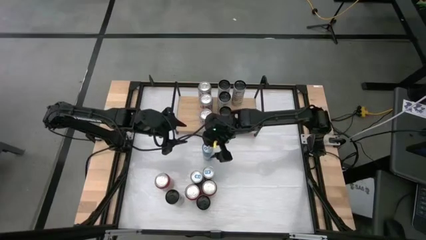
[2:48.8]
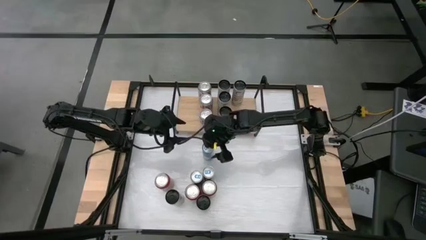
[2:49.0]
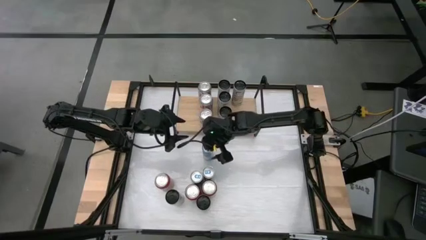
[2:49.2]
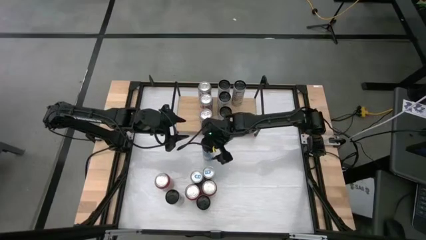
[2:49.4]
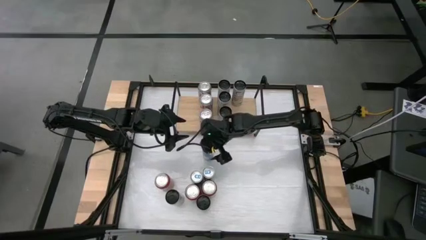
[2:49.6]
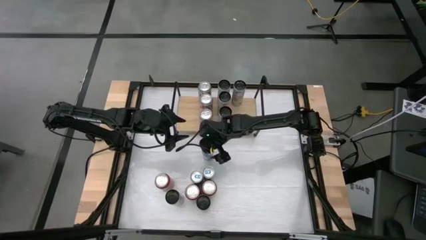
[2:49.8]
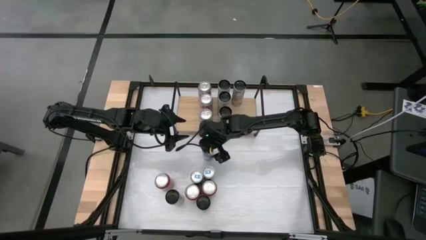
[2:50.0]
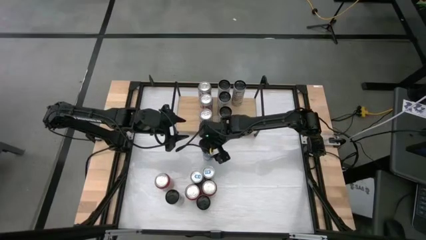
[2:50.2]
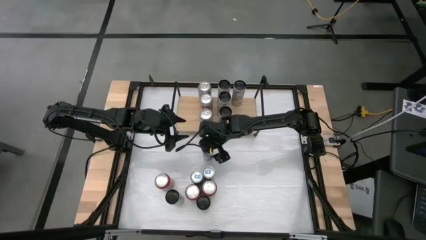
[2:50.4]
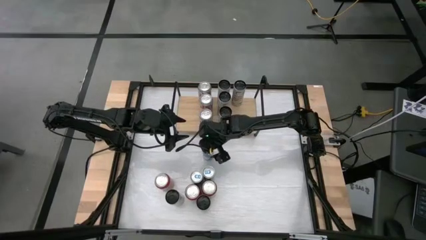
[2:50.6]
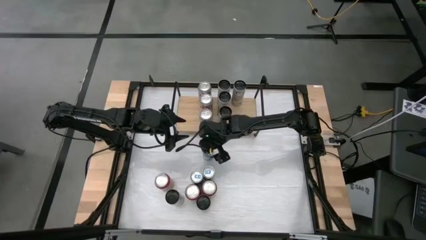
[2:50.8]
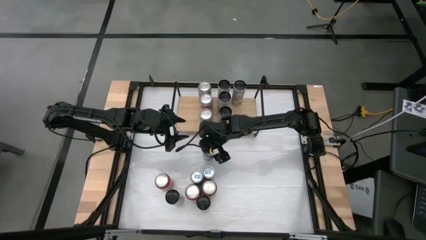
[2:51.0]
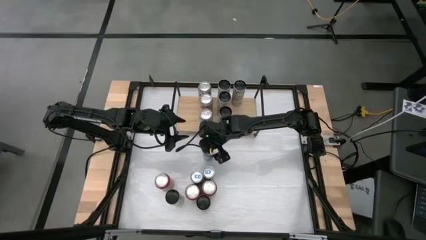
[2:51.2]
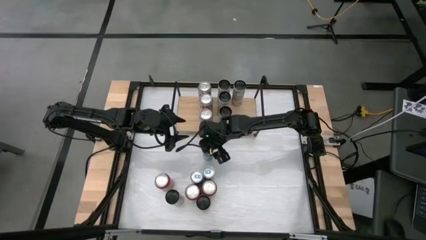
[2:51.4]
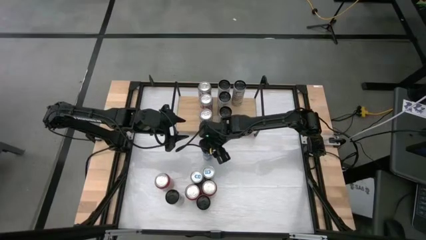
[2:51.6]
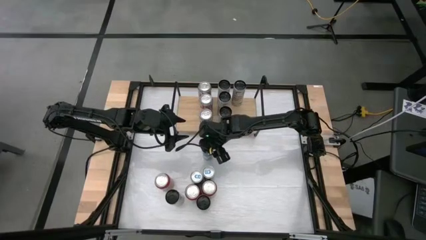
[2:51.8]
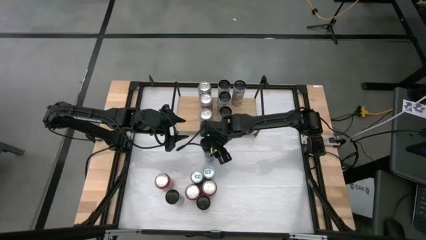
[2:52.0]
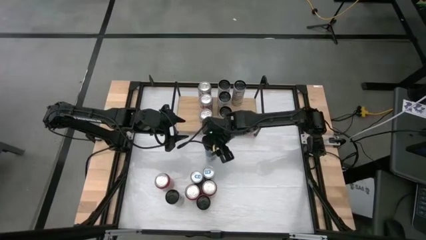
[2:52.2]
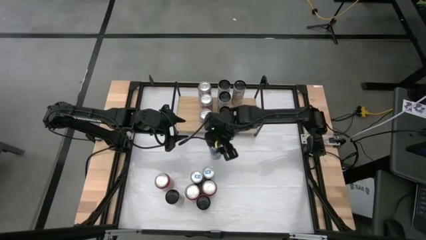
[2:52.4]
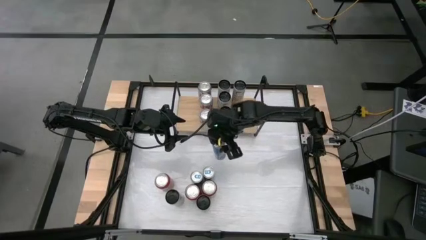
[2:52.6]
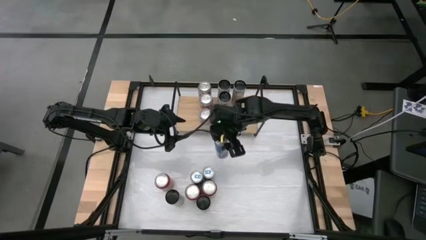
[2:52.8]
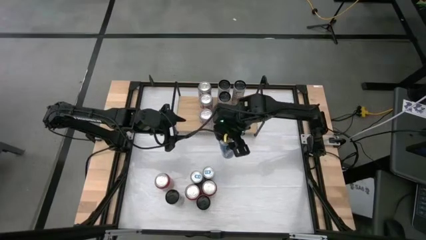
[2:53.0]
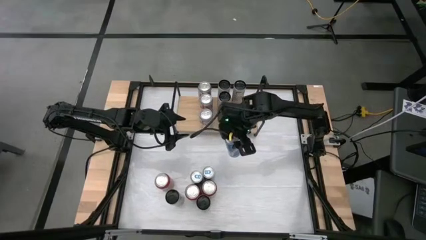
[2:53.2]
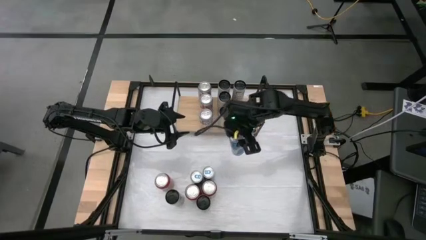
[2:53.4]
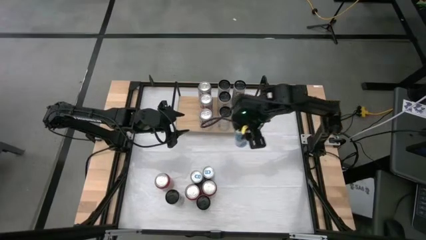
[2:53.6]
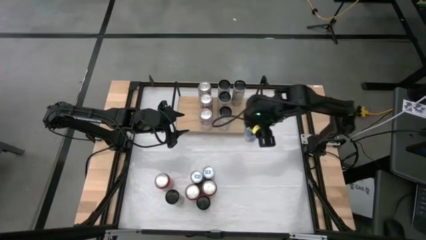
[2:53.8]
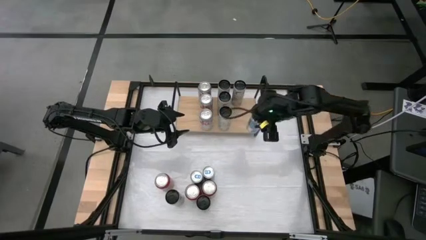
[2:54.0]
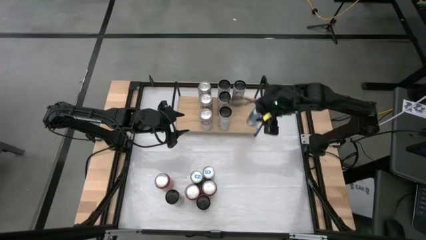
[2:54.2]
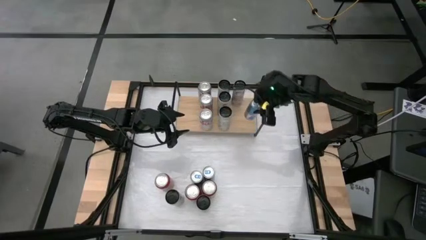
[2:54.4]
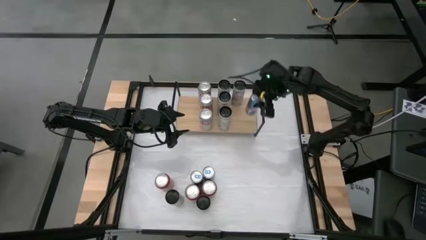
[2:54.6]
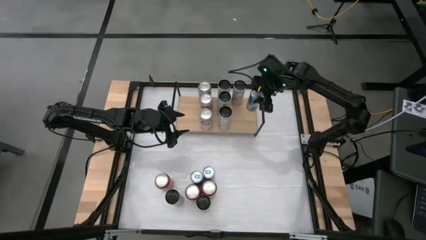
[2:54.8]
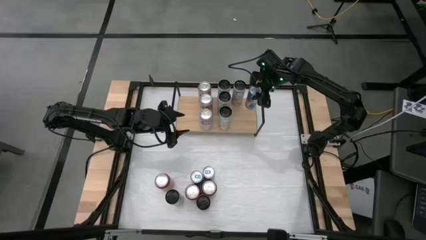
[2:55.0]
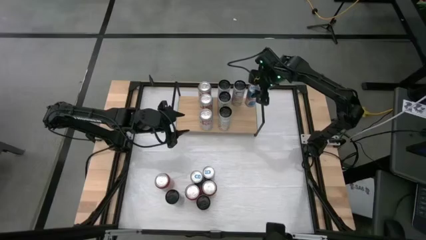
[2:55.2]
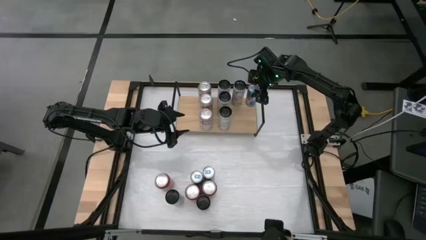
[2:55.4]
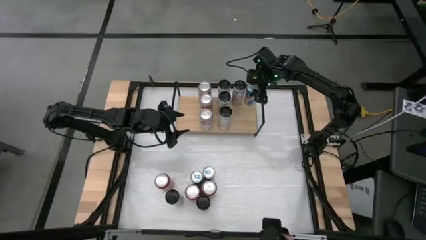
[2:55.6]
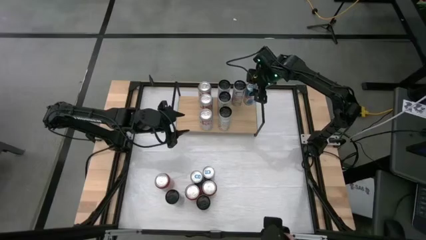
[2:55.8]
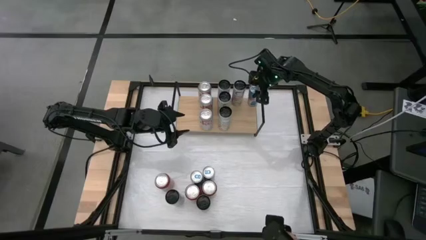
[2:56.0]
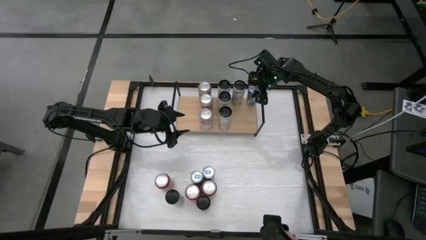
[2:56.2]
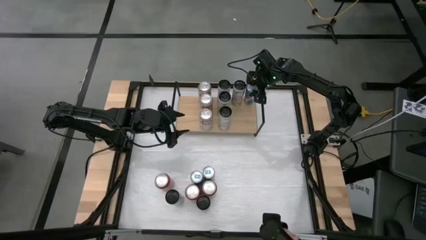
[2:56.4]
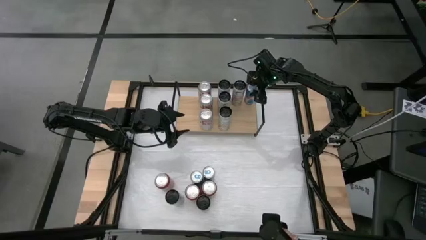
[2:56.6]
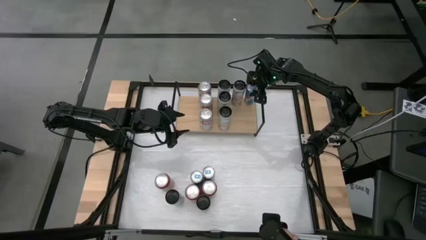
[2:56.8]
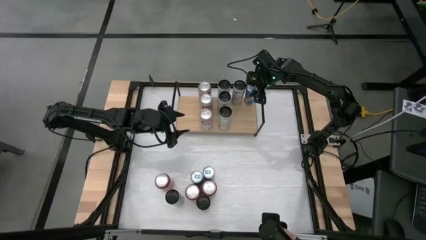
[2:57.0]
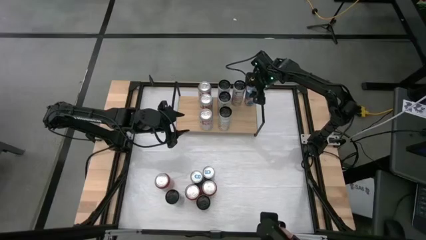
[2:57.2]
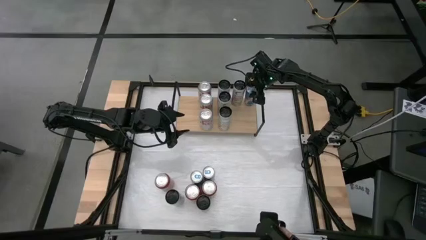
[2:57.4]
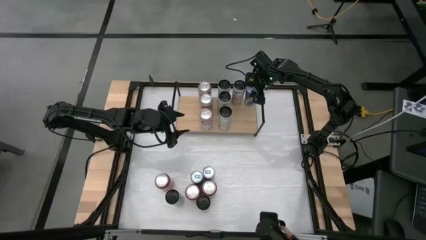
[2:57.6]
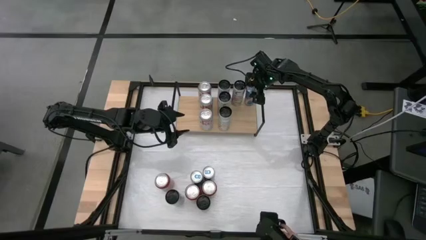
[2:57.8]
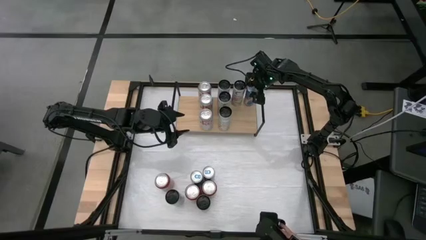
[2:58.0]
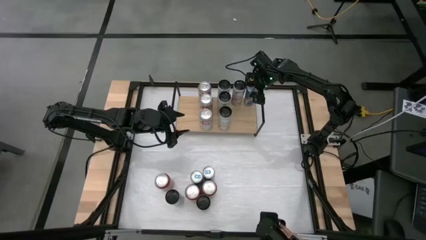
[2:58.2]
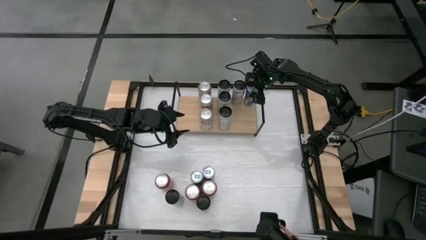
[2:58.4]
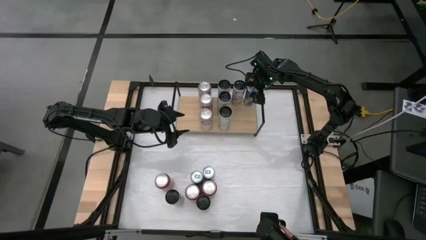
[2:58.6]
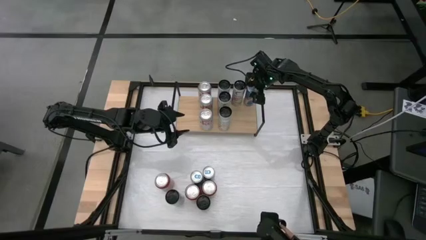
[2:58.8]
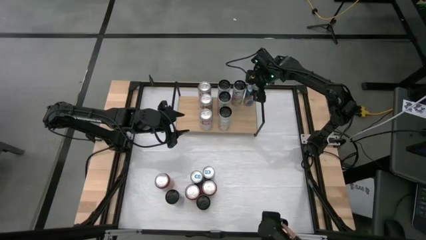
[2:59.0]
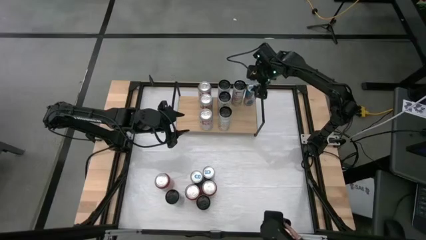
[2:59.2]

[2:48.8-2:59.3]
Task: Place canned beverage on shelf
Put the blue soda can onto the shelf

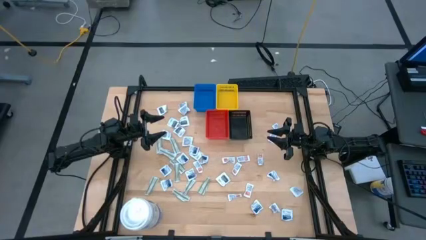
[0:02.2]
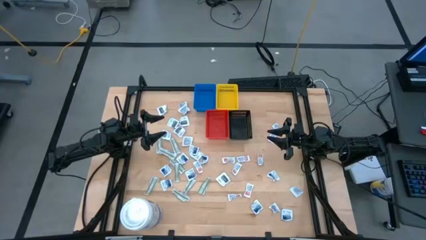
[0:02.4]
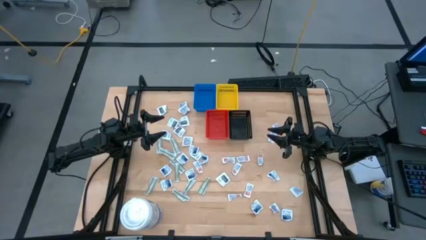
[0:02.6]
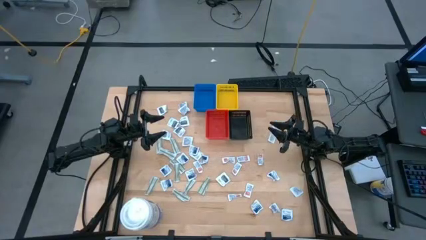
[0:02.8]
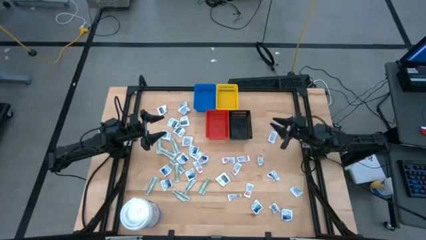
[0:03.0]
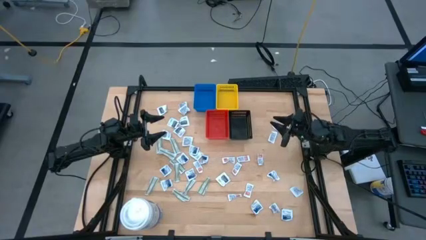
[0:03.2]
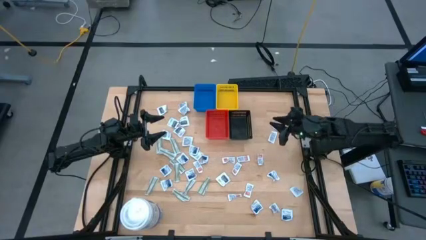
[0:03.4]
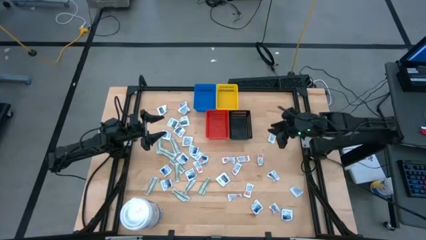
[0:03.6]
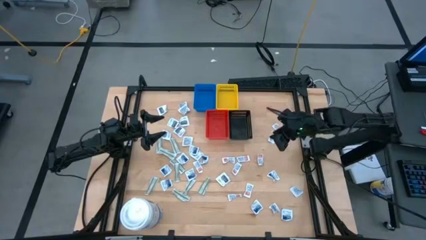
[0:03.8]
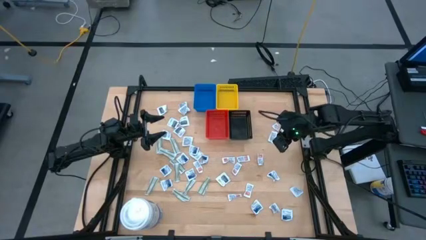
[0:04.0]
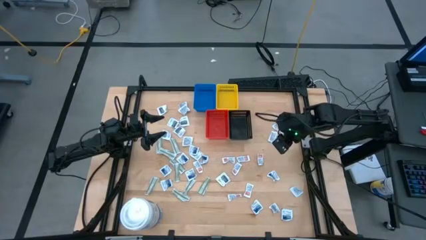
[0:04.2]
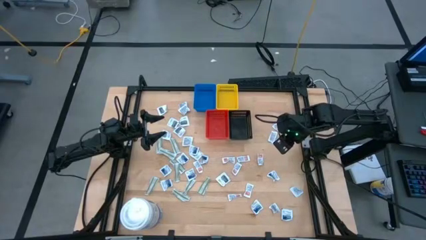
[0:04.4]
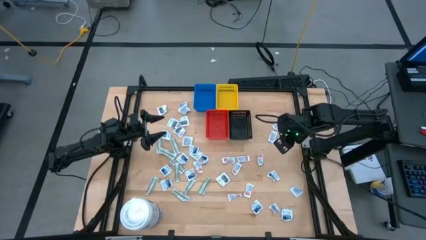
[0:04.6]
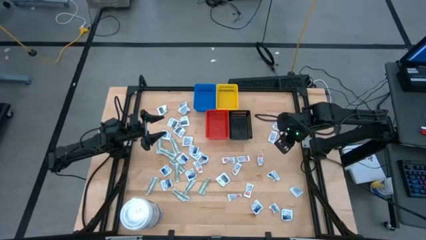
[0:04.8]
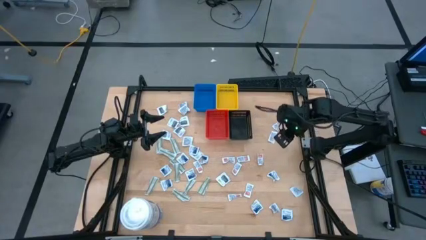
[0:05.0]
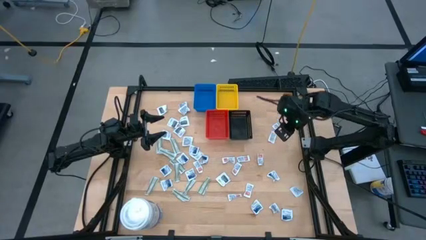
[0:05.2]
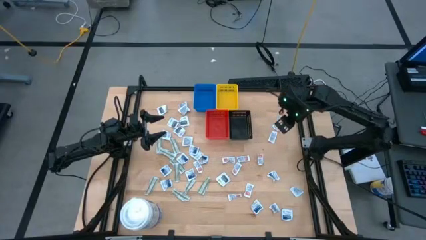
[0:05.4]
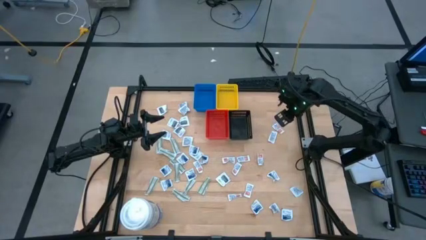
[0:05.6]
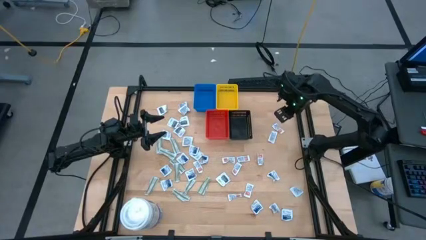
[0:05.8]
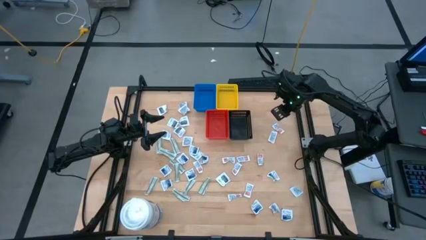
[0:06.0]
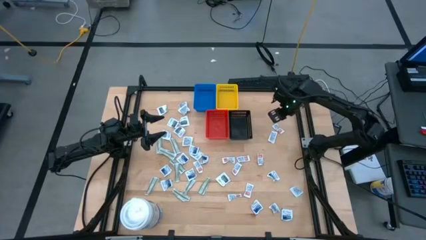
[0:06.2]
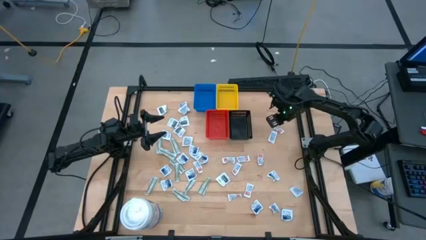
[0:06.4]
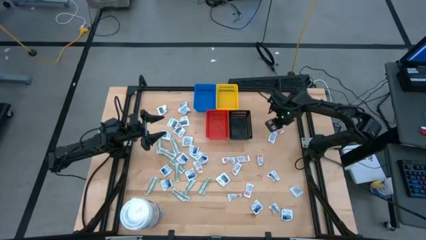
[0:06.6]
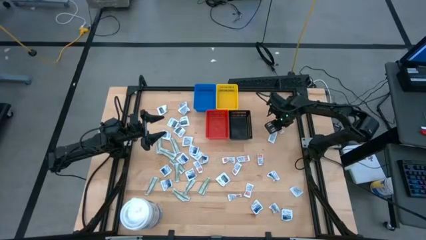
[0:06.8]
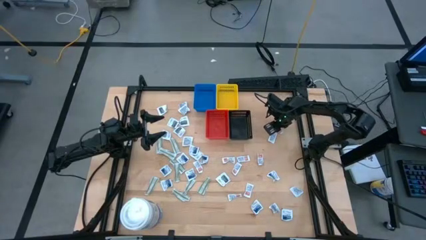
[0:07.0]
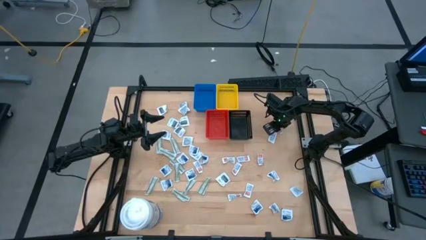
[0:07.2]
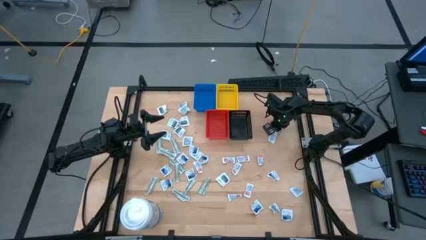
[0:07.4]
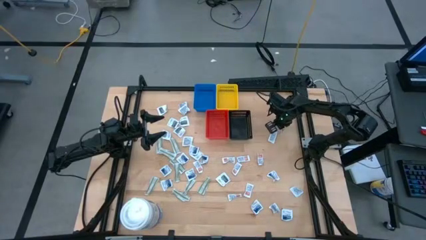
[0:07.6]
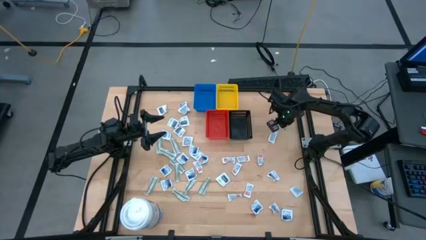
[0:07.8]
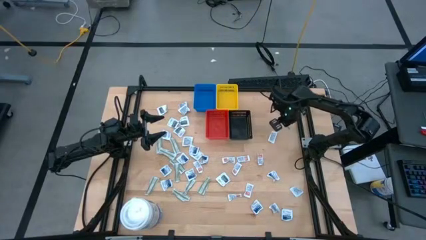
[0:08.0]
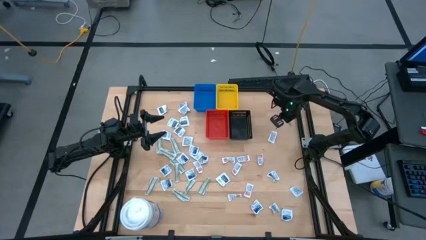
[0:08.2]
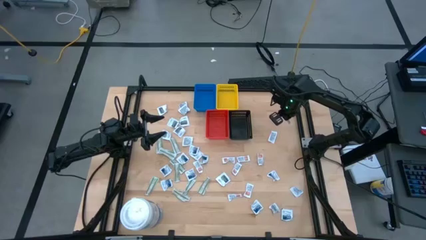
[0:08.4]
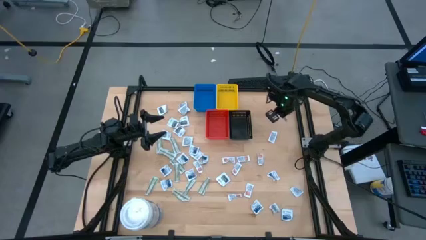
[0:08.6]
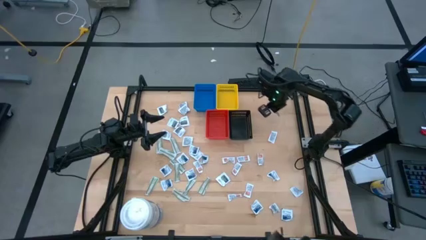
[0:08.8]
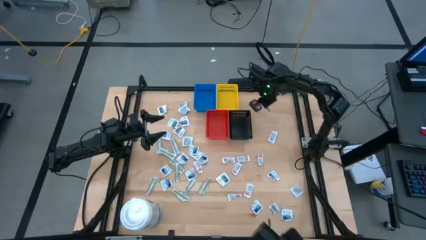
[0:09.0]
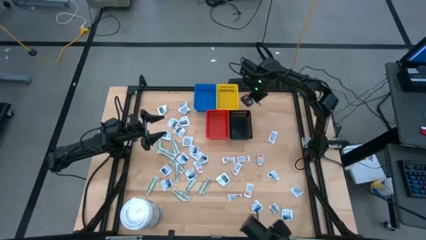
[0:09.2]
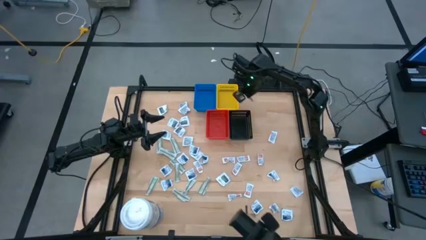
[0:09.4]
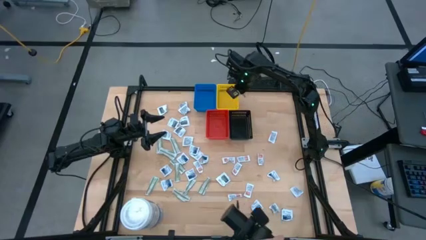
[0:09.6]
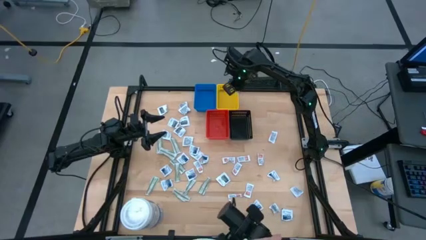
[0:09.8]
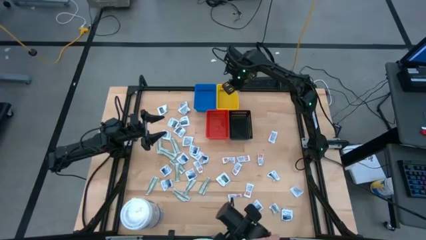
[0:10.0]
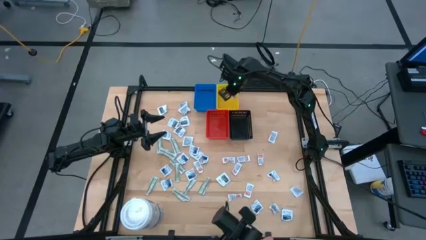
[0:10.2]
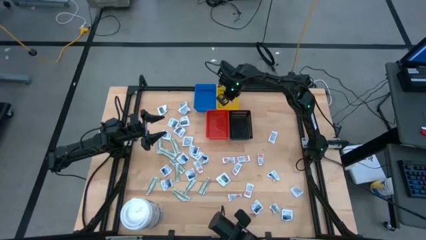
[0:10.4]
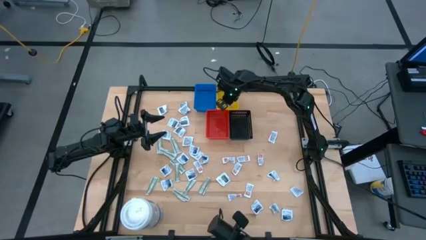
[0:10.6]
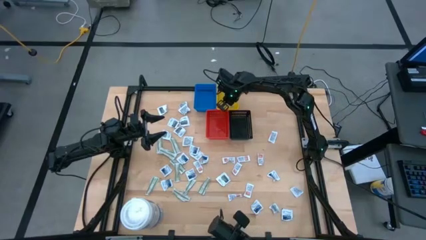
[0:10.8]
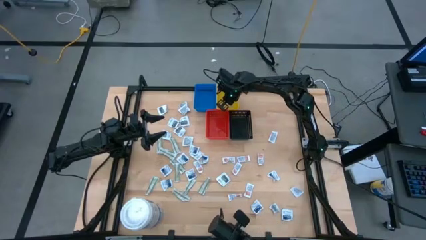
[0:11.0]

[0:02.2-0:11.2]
Task: Pick & Place First Aid Supplies
Put the ointment pack into the yellow bin
